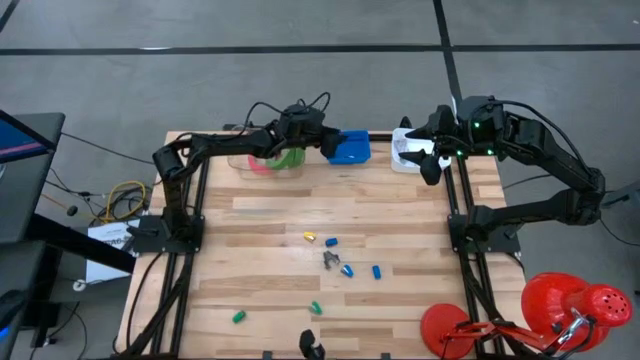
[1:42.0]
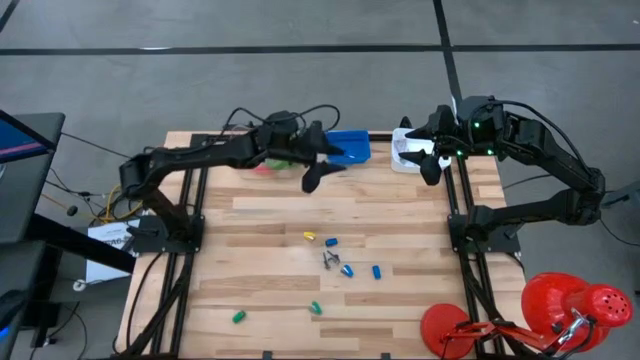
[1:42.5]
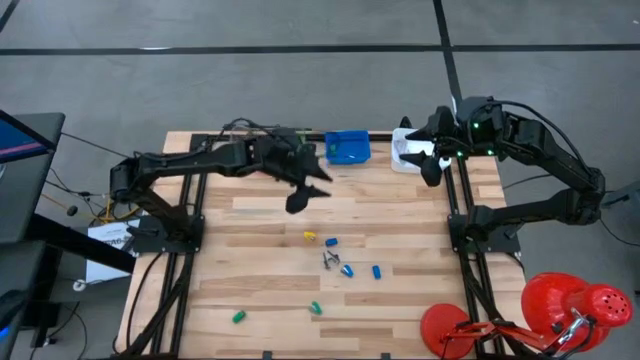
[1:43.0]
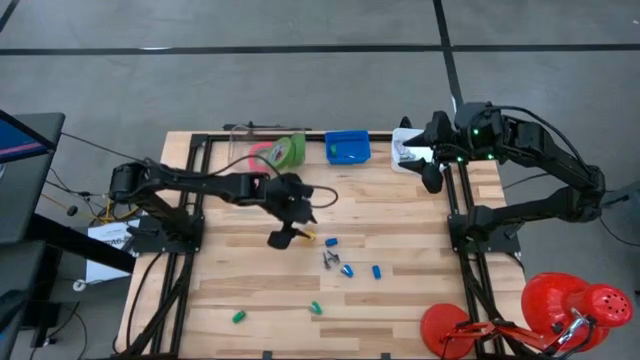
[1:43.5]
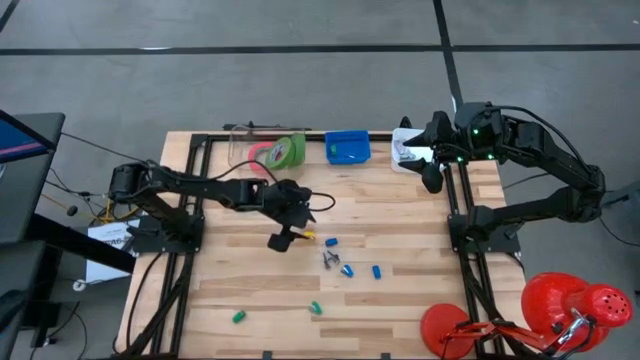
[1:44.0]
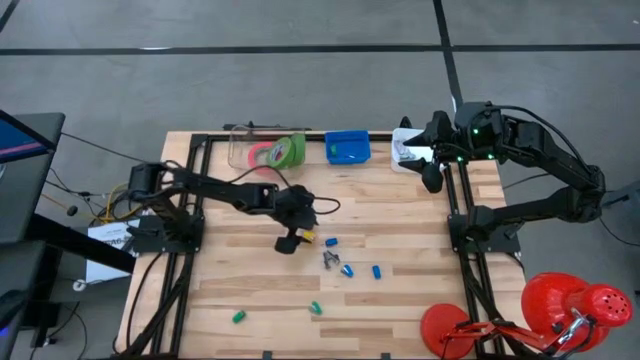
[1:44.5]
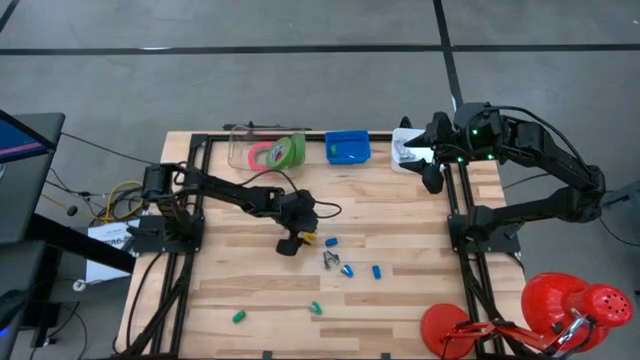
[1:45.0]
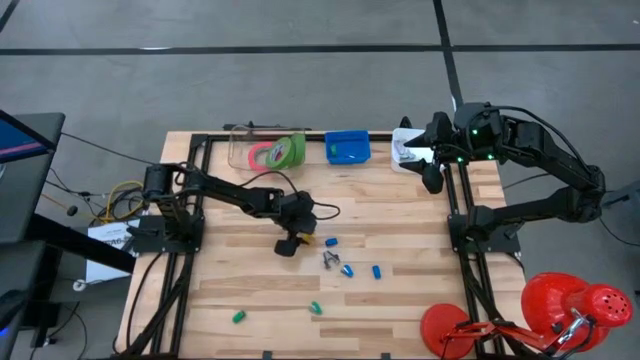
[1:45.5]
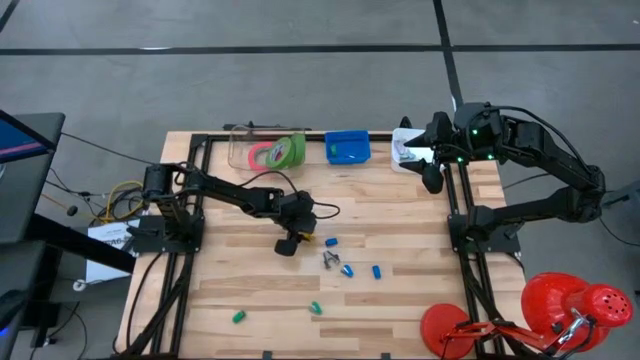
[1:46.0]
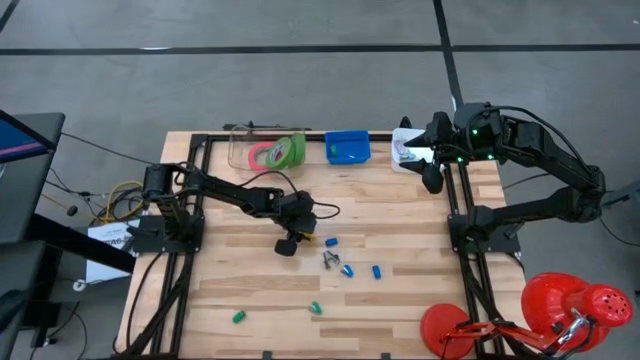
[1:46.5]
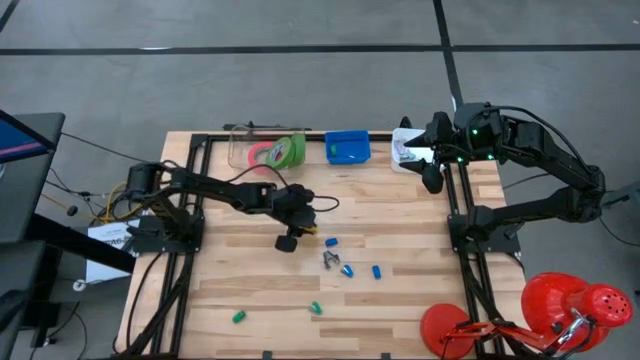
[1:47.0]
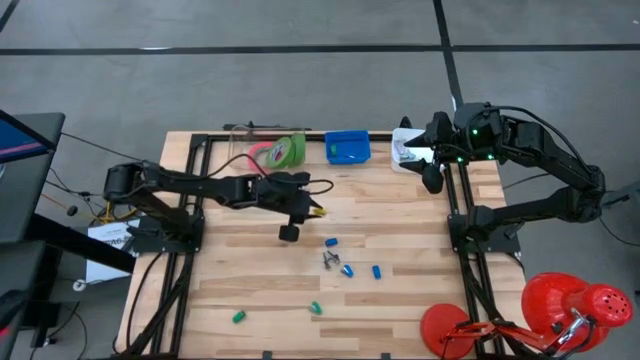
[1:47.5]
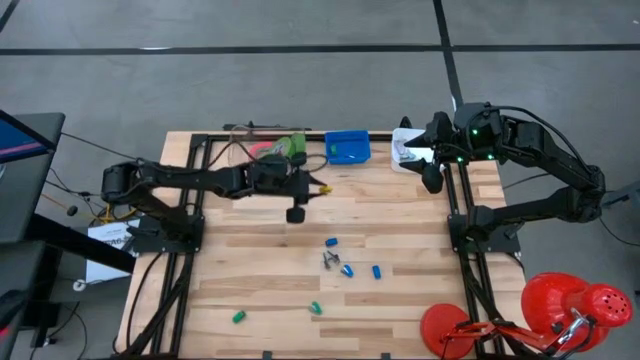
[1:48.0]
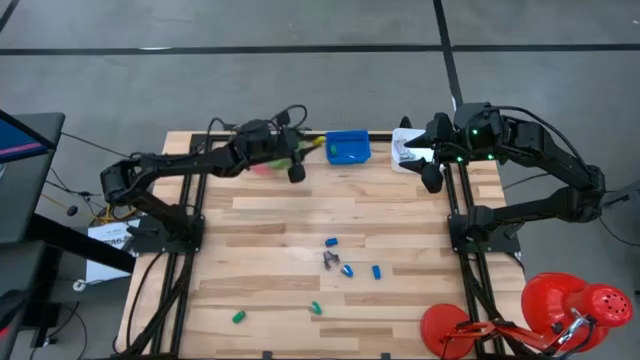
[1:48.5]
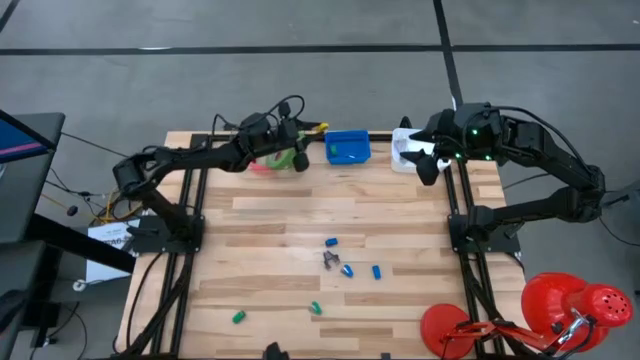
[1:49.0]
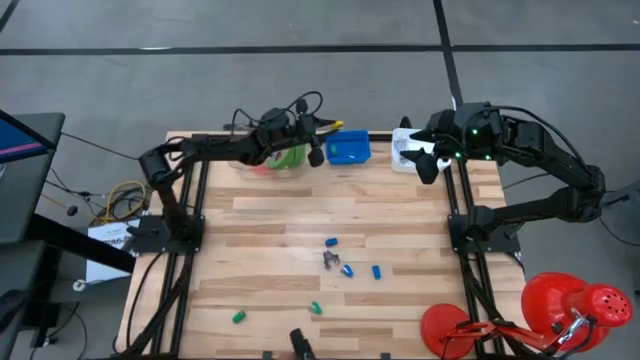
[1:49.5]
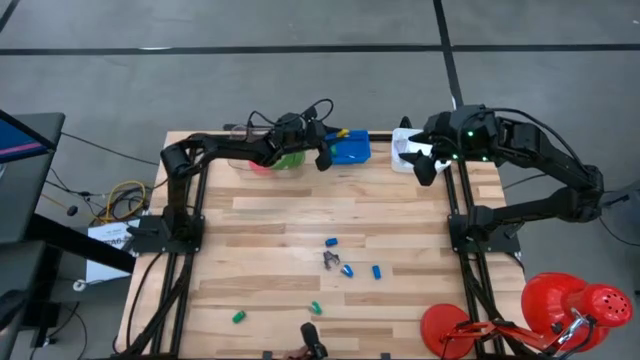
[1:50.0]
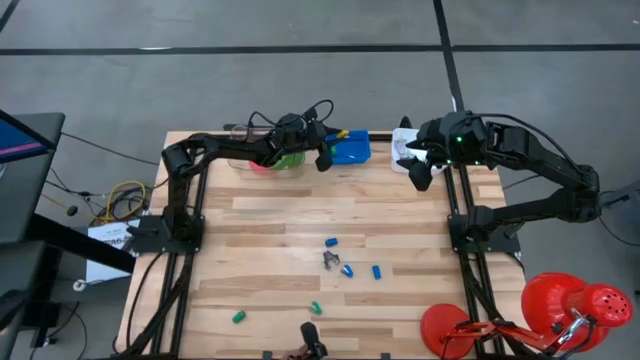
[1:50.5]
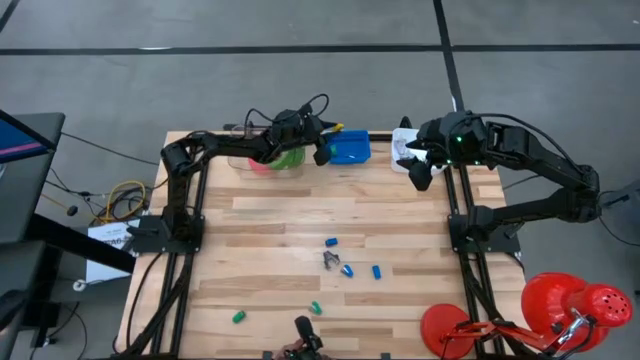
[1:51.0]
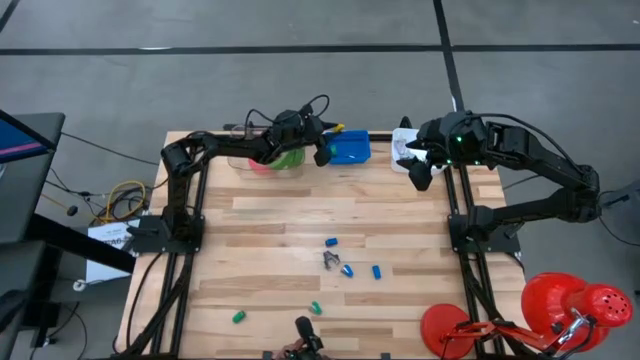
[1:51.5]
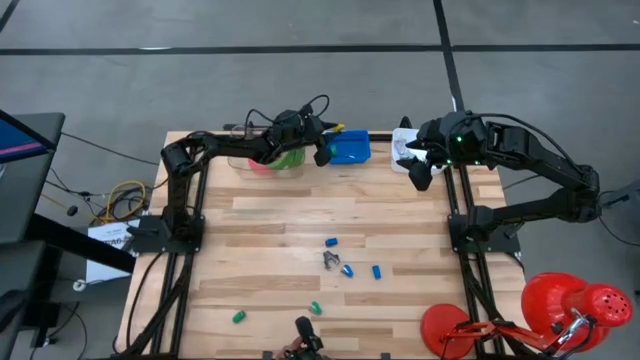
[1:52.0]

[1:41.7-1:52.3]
Task: Pick and place Stapler, Stapler remover, tape
Put the yellow stapler into the blue bin

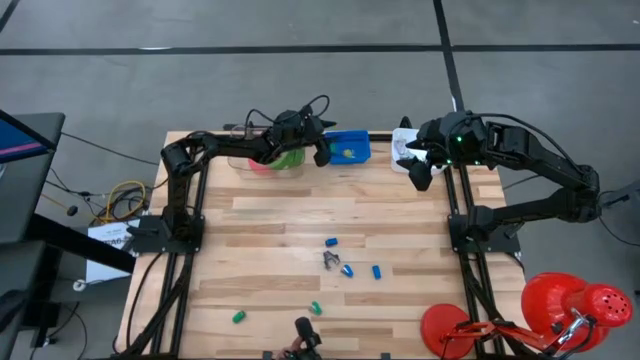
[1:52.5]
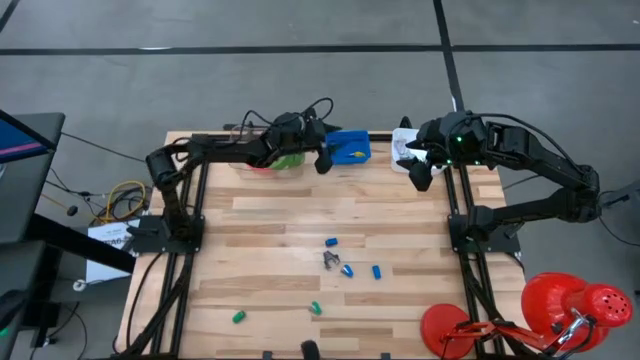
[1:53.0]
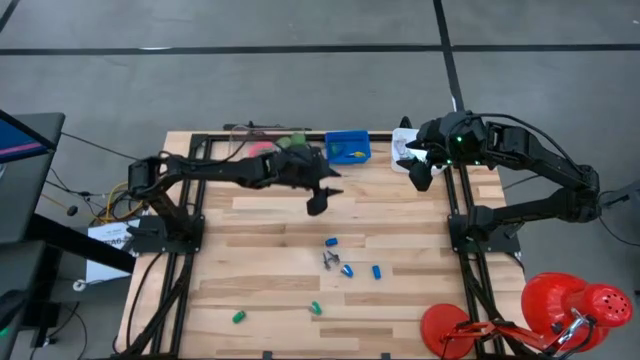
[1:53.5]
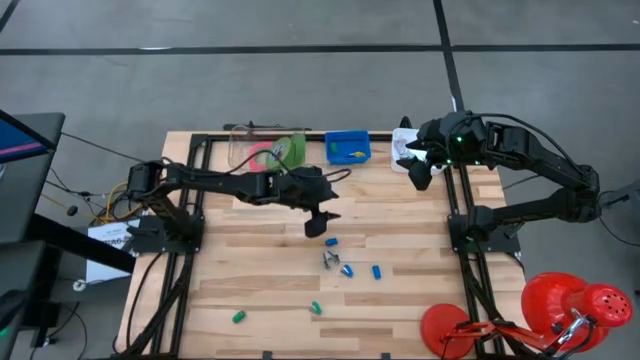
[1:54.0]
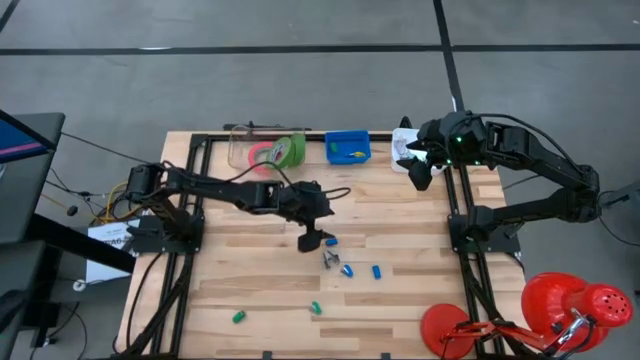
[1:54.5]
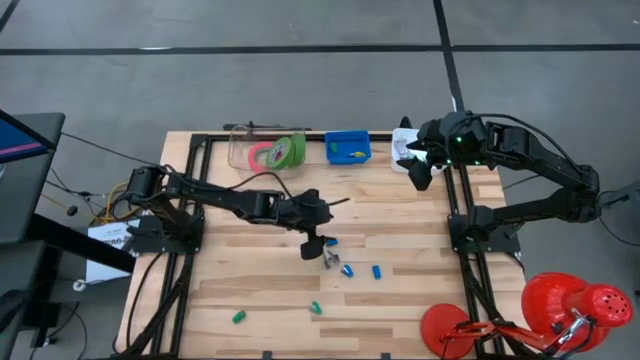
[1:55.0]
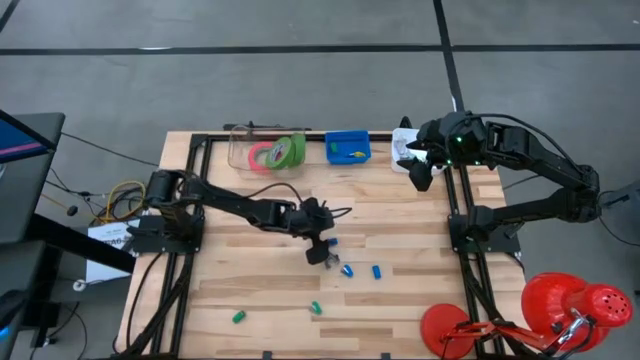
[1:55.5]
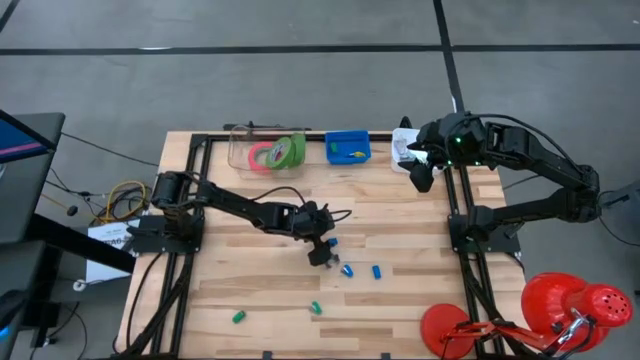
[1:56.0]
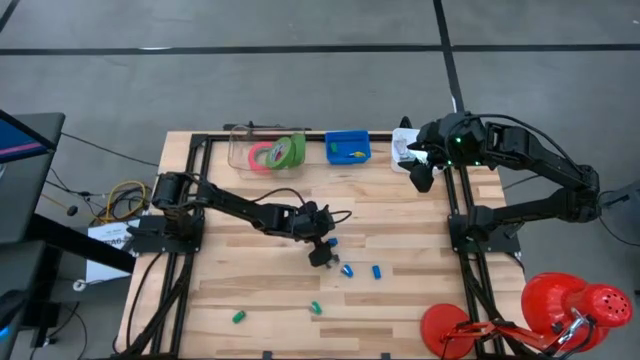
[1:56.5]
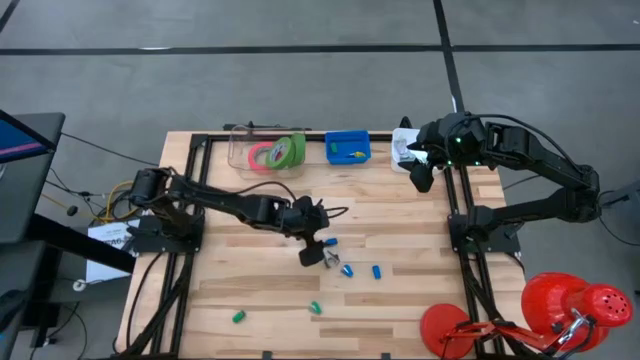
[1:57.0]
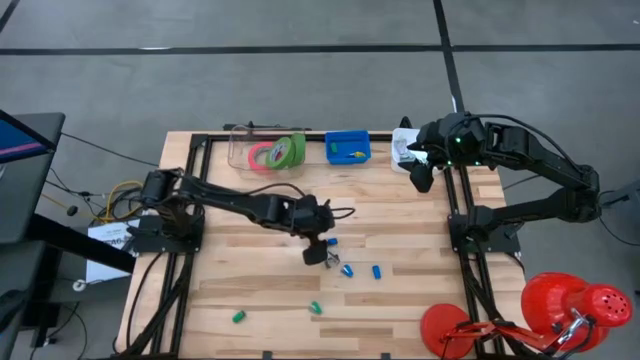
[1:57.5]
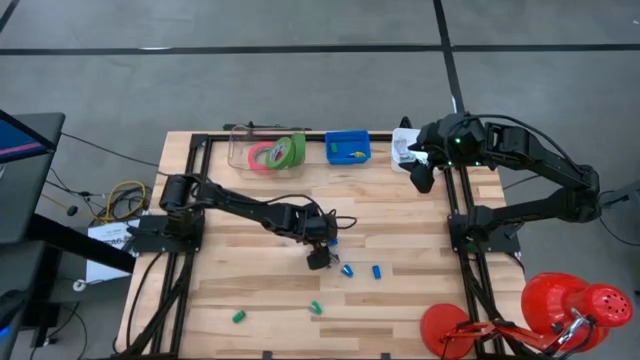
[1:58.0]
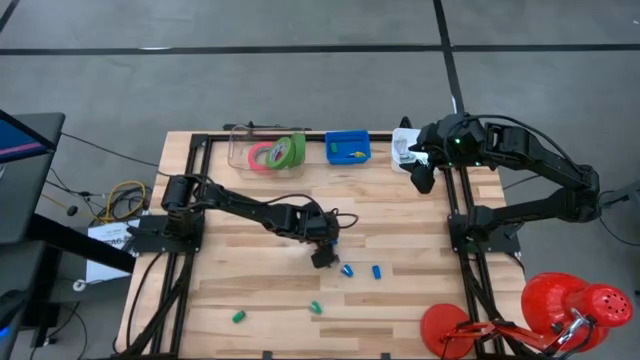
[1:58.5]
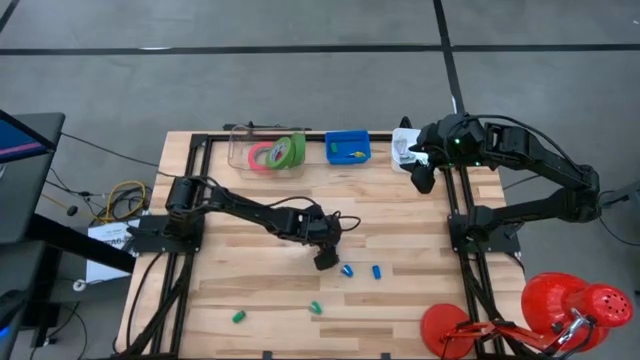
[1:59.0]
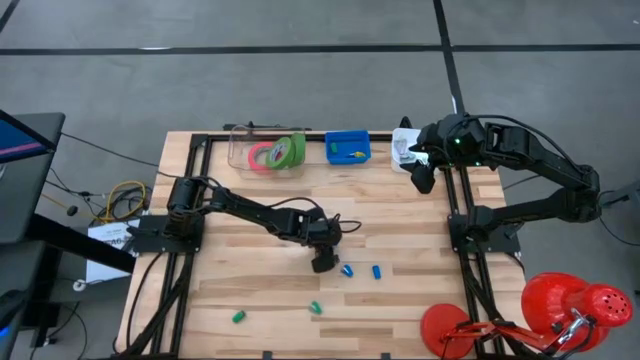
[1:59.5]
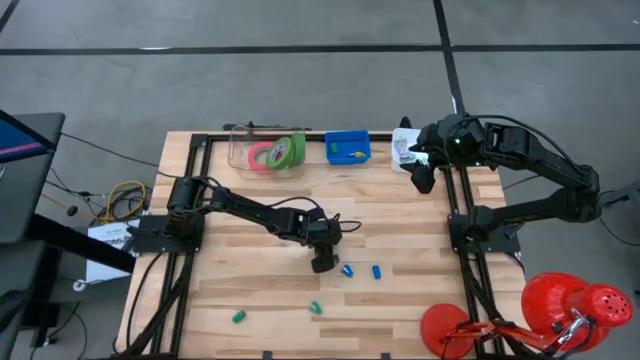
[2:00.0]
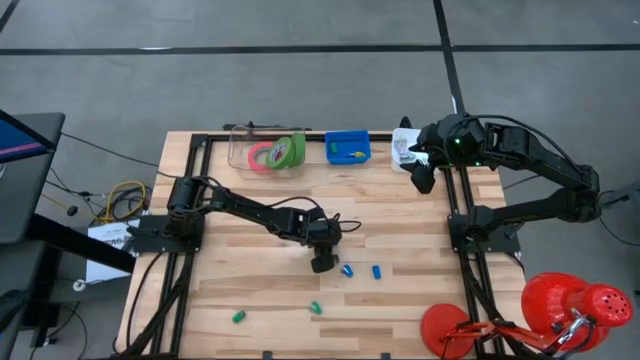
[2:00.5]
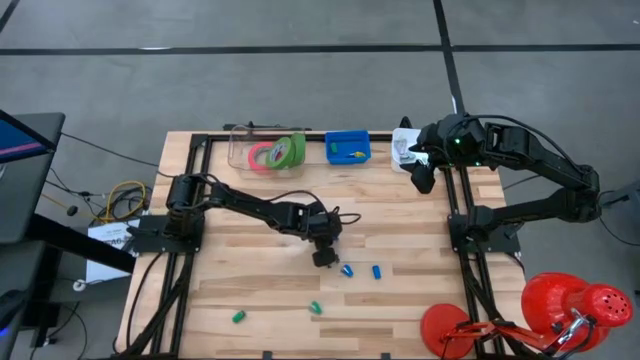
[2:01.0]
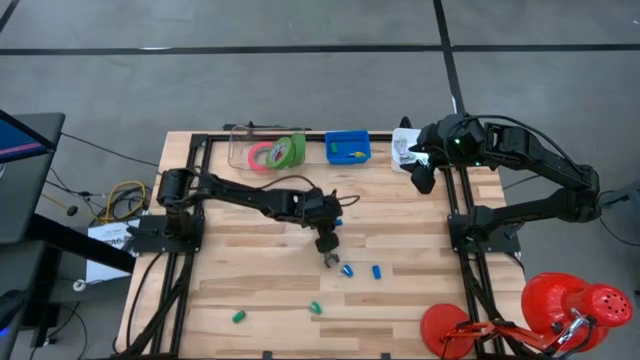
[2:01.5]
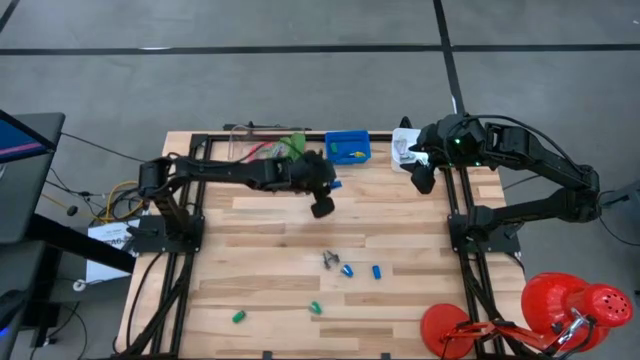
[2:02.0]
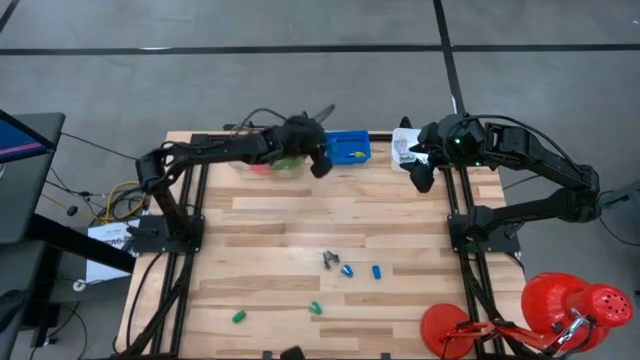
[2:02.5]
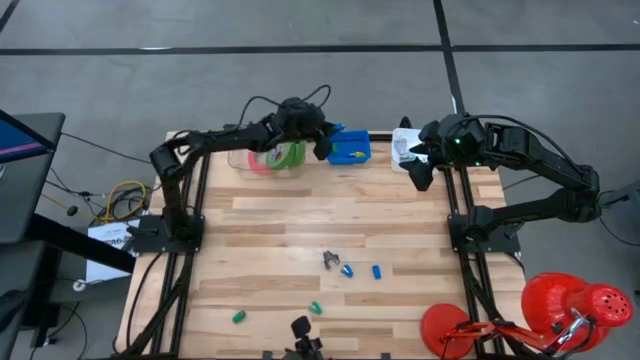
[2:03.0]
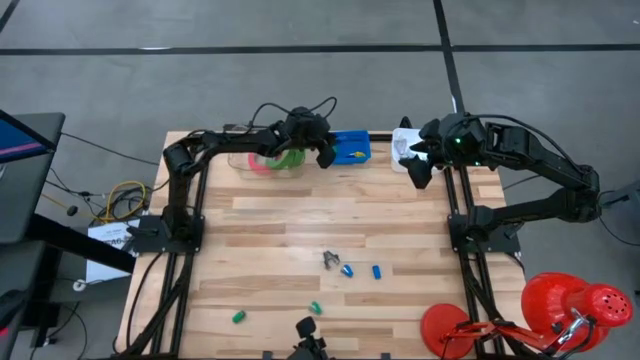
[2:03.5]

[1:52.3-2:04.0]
Put the blue stapler into the blue bin
